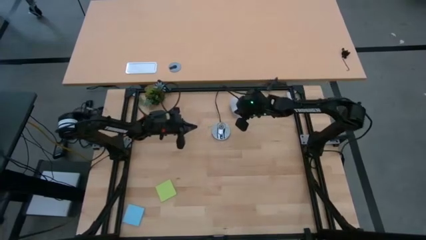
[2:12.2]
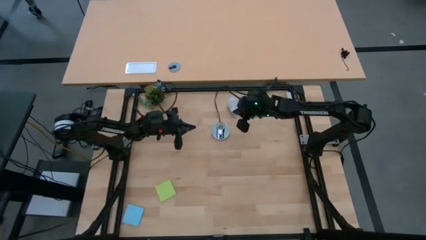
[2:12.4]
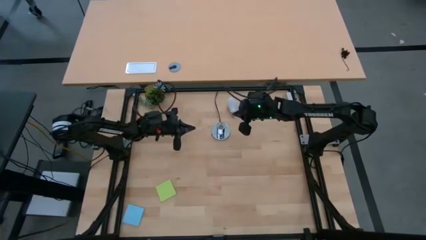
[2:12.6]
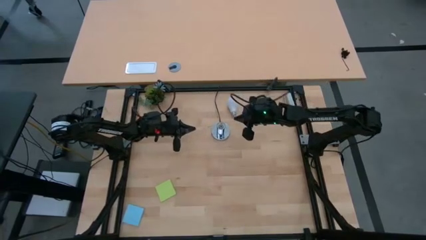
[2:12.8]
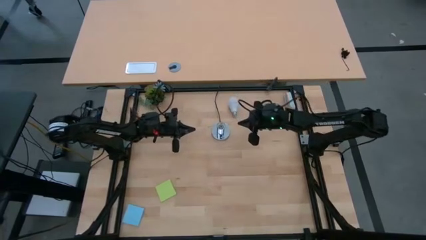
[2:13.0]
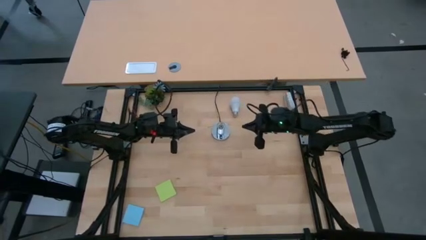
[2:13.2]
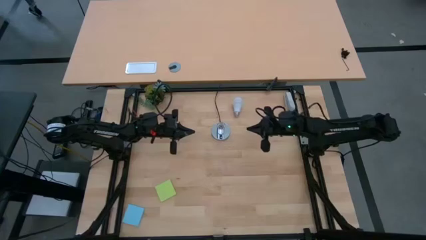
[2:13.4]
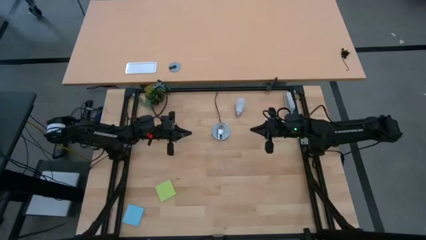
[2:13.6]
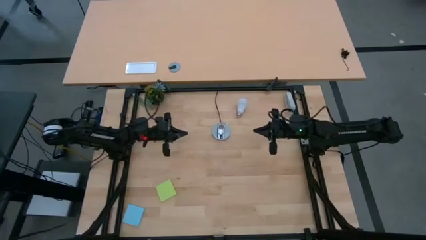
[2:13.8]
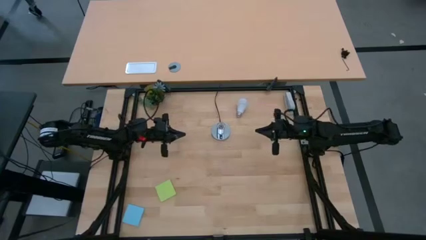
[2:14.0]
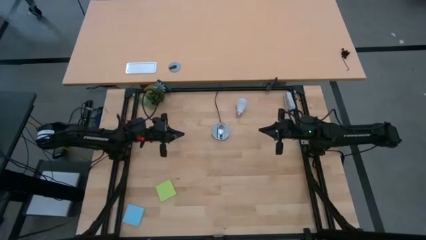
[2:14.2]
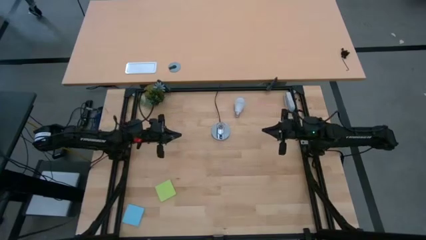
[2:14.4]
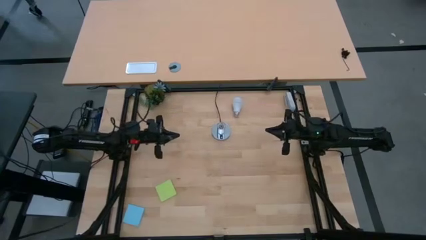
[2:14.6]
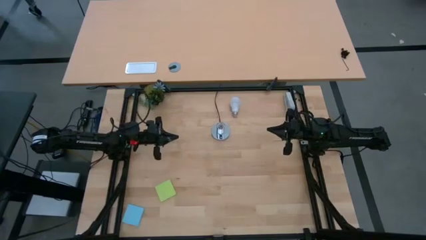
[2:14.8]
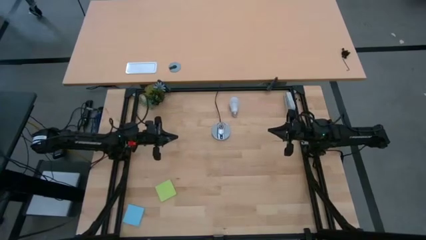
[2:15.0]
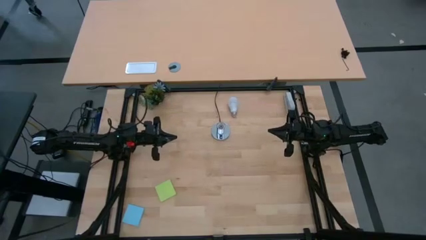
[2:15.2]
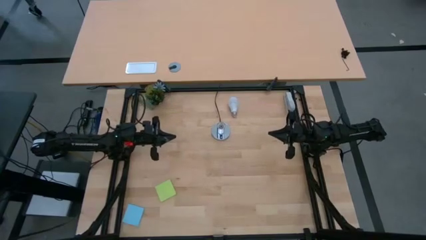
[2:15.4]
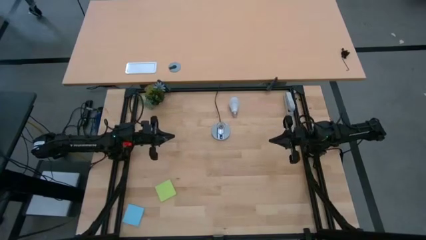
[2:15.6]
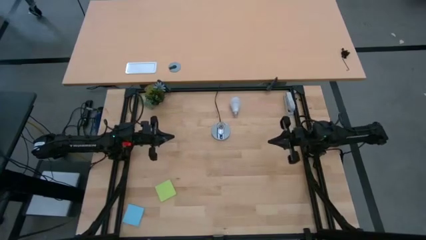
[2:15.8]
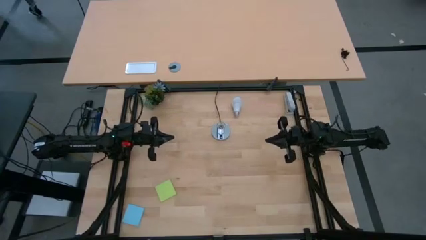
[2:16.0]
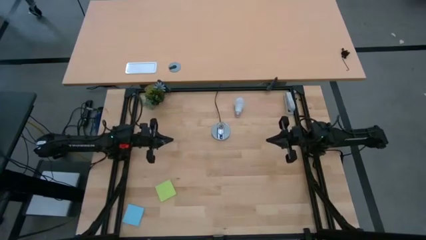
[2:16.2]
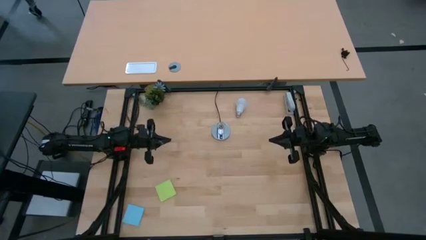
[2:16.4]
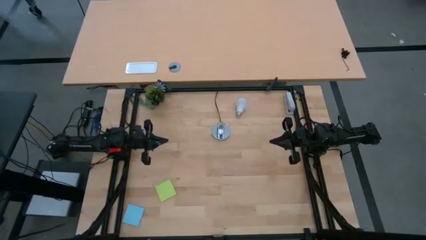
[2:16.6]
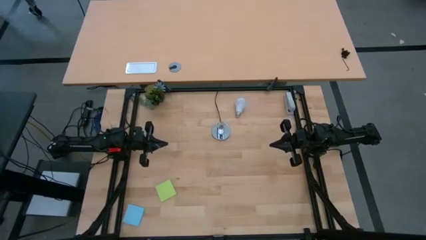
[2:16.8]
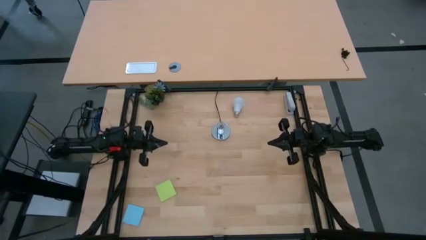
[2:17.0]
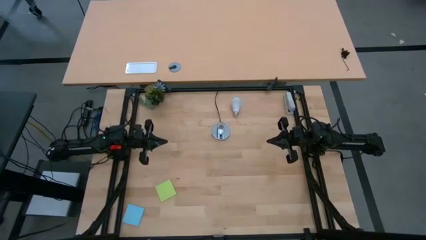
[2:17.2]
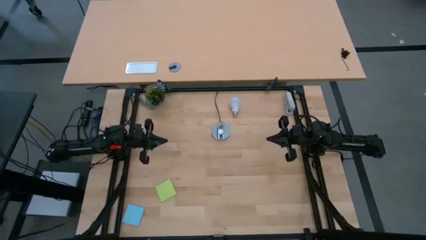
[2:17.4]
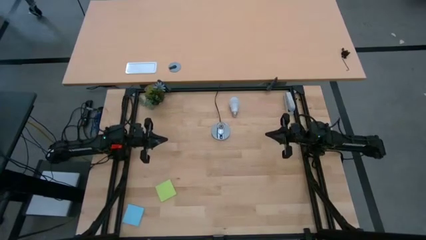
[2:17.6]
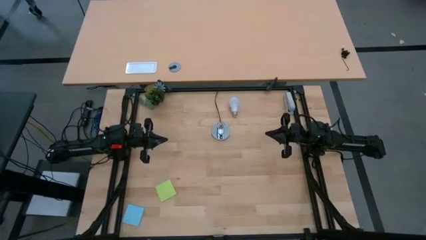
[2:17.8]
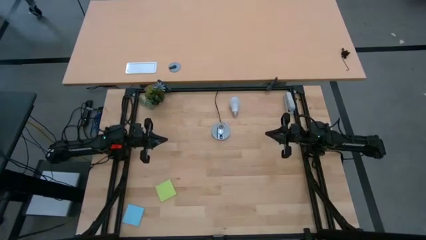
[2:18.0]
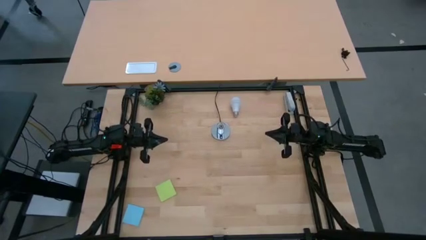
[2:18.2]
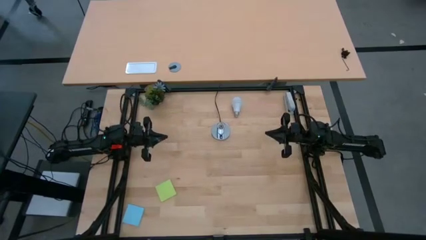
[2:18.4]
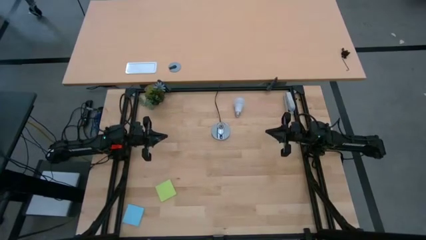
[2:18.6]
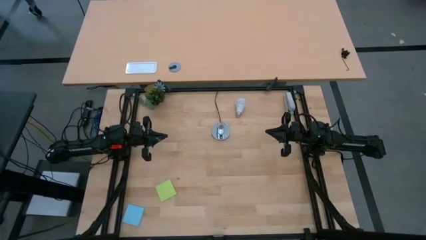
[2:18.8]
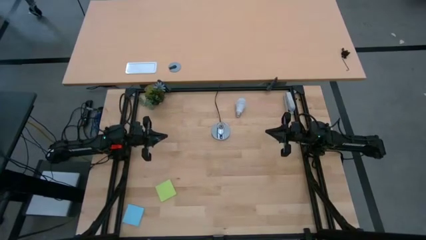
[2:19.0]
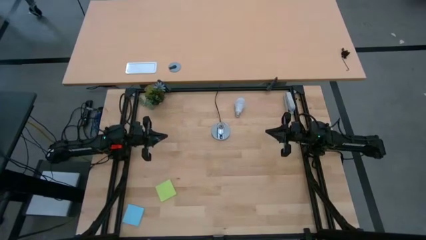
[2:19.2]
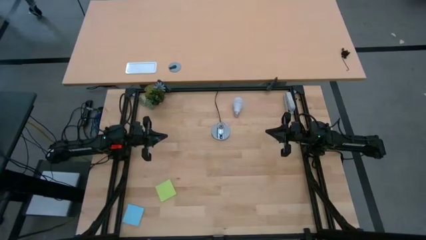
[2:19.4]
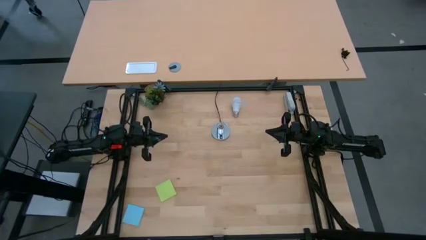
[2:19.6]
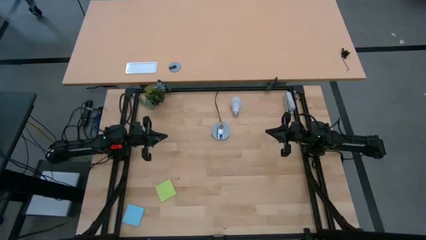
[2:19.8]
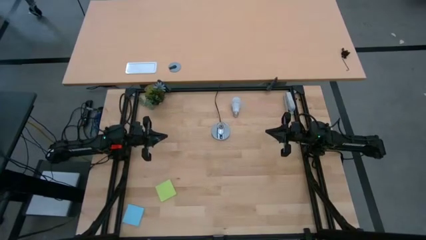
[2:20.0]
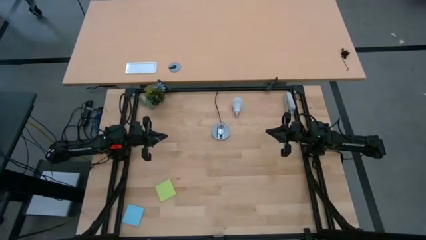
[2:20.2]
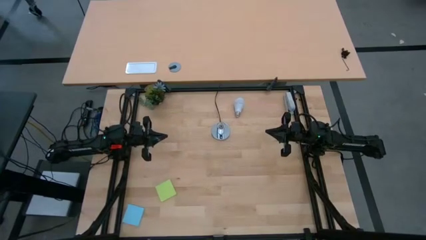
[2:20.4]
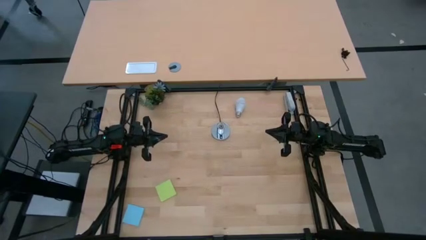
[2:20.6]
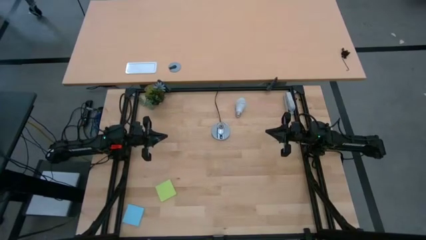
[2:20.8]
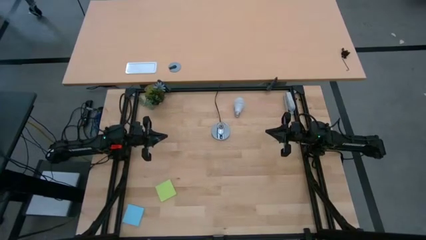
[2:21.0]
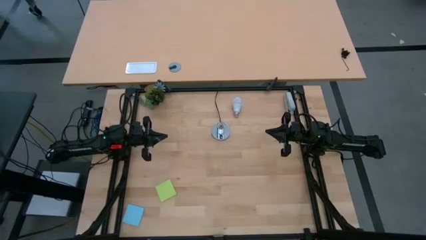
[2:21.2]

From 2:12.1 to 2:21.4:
Task: Screw lightbulb
Return to Home Position

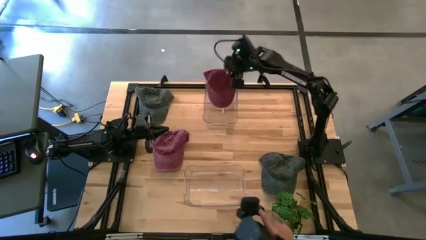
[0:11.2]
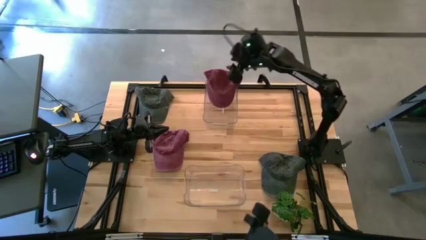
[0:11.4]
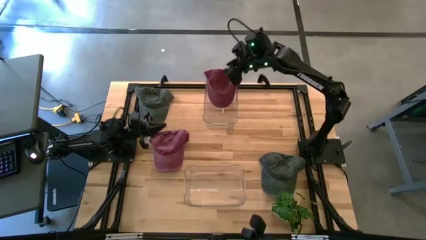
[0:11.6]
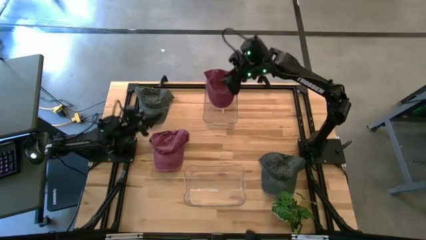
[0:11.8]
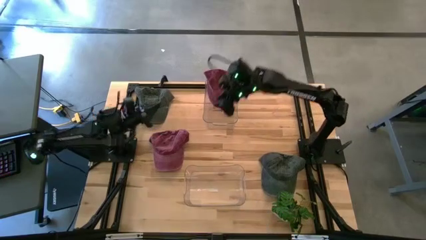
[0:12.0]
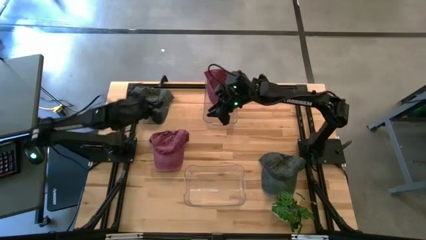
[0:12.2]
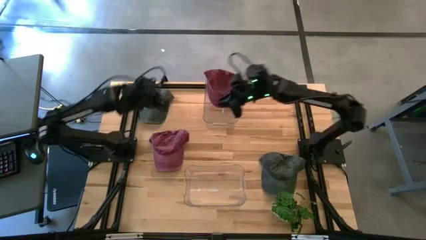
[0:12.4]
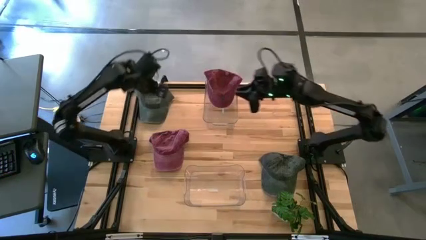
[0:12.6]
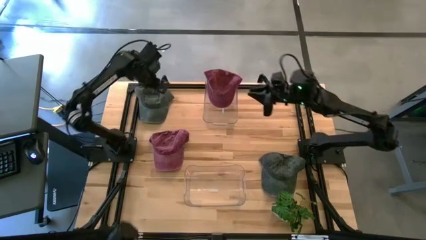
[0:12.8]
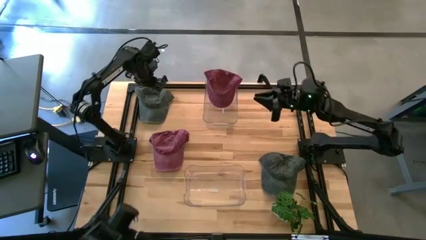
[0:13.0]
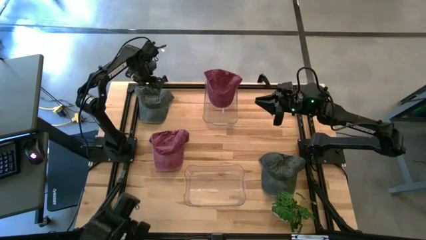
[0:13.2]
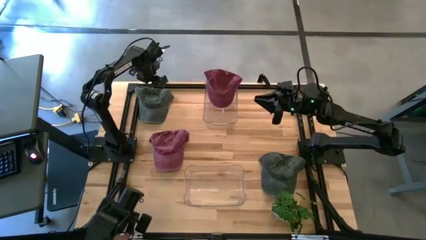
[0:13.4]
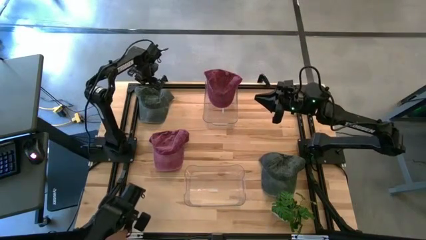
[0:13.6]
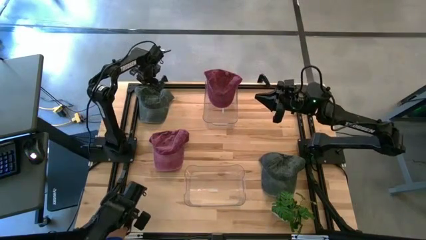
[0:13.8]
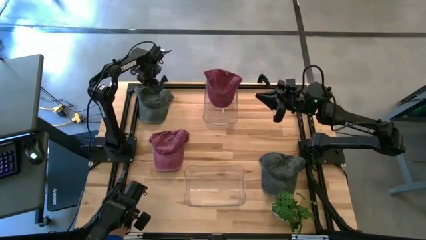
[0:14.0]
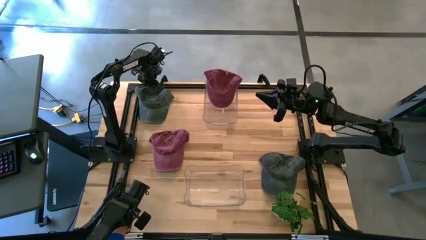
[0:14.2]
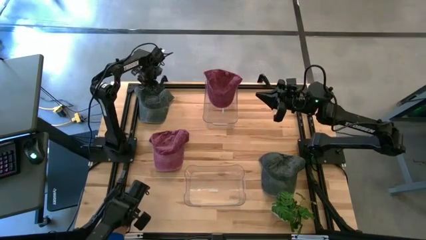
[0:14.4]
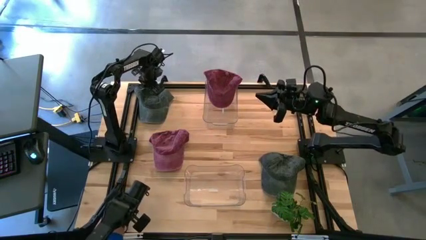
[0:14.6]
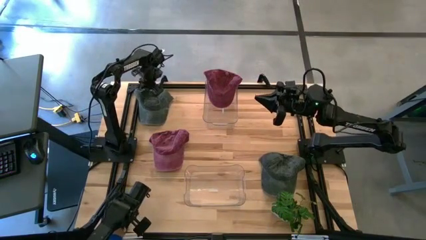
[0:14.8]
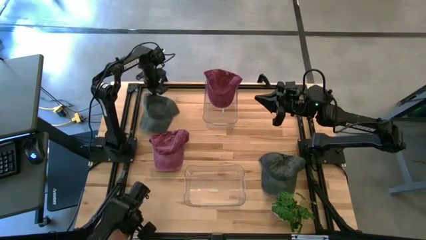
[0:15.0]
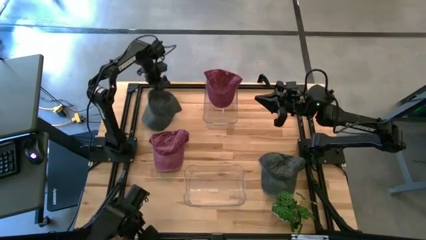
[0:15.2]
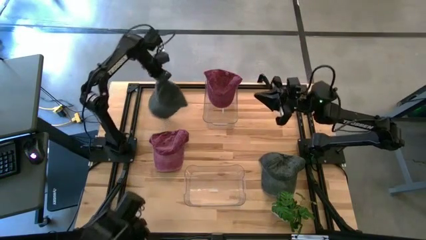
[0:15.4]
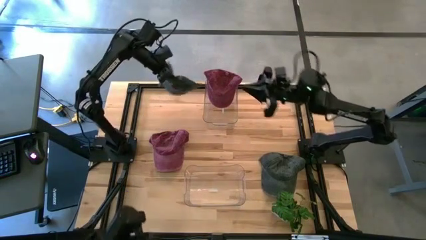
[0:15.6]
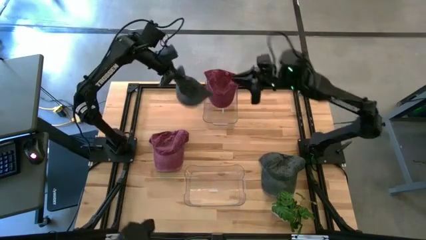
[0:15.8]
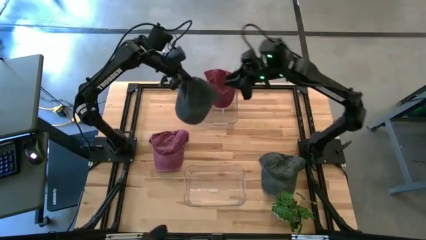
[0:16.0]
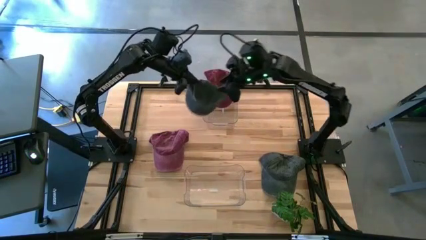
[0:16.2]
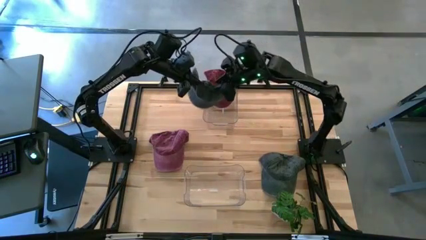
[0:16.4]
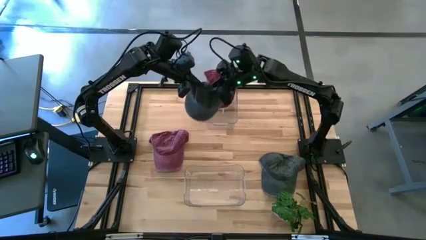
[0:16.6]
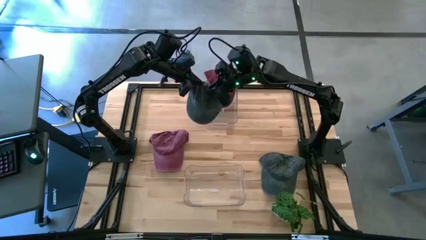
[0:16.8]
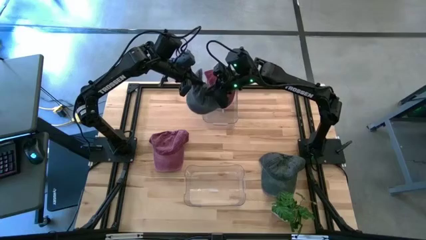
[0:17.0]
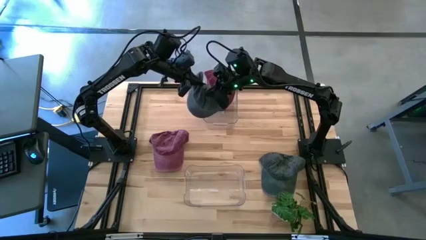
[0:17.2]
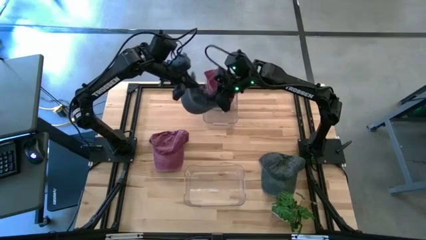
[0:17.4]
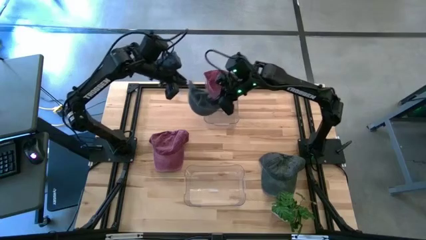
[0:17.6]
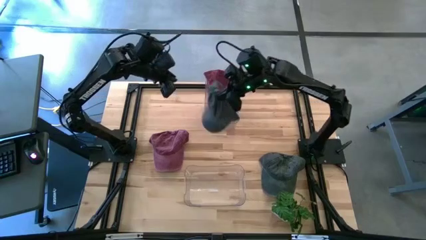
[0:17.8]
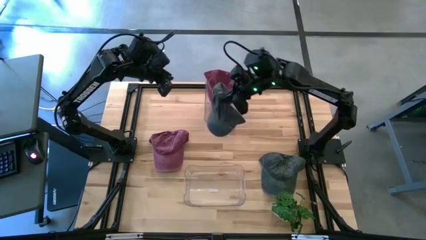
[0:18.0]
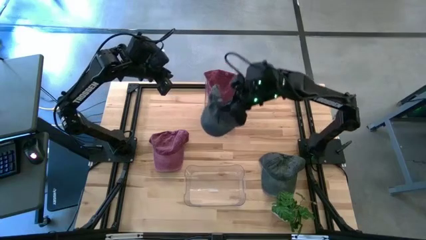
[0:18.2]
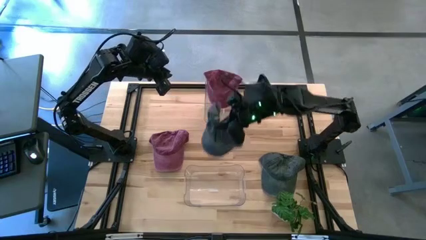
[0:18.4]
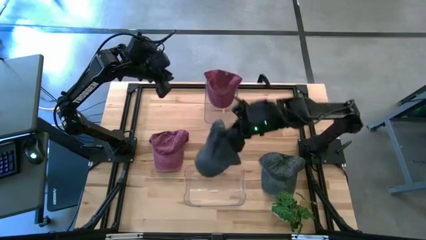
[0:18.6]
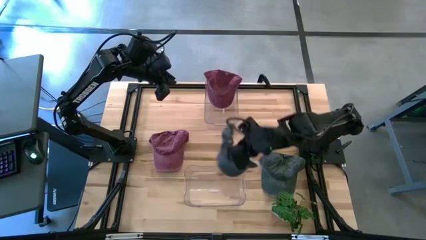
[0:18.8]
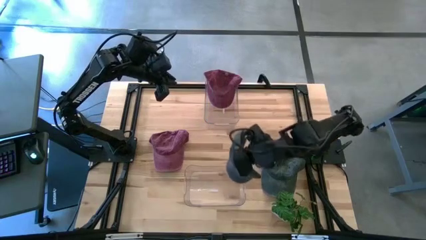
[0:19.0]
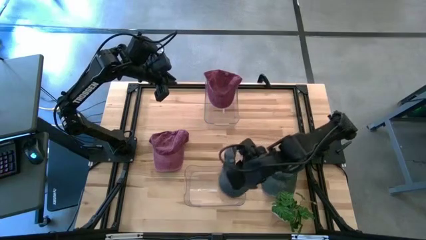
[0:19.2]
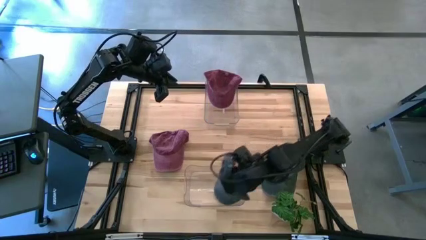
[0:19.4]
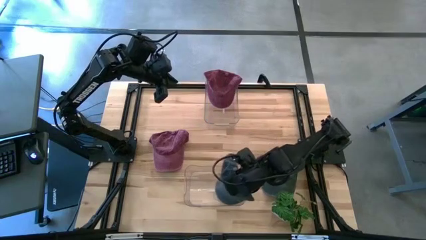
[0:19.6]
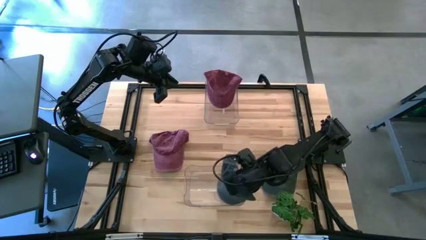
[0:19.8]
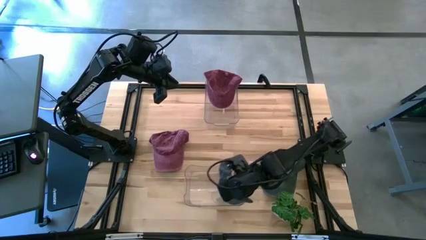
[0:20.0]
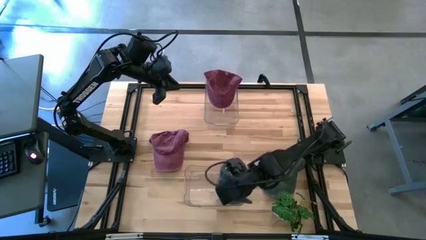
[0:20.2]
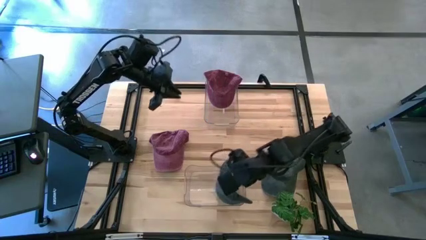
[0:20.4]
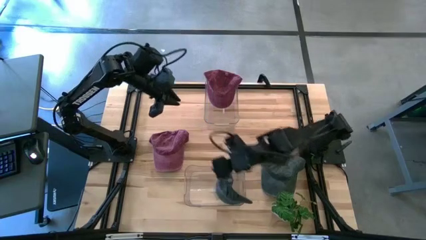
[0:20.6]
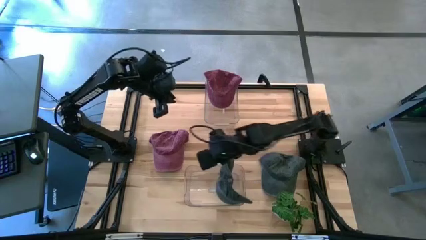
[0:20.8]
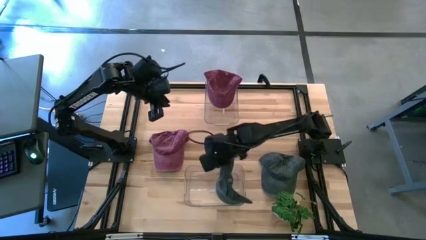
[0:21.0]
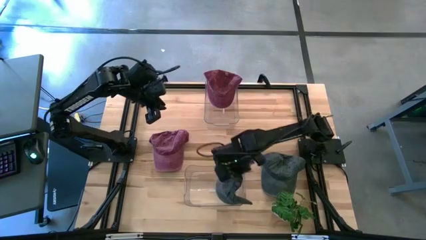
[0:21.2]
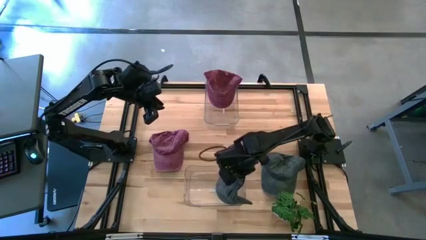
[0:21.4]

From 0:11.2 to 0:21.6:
Task: Pick & Place hat
Put the left black cap into the bottom transparent bin
